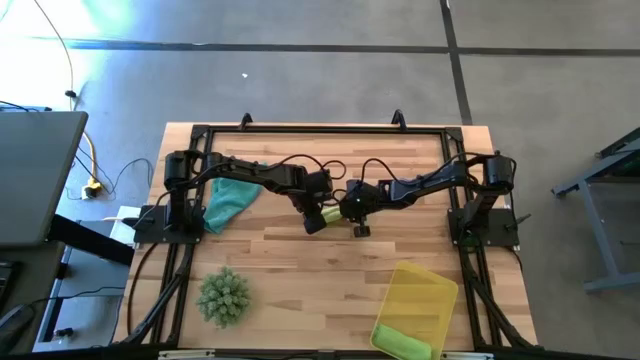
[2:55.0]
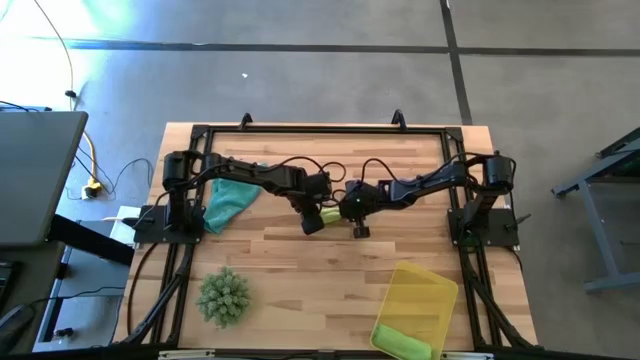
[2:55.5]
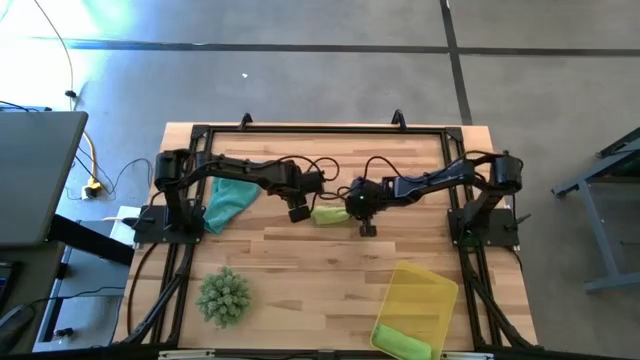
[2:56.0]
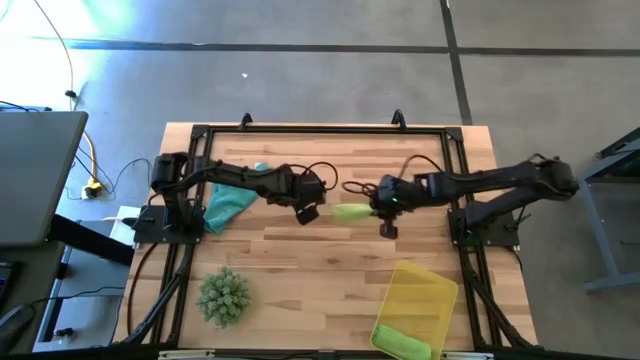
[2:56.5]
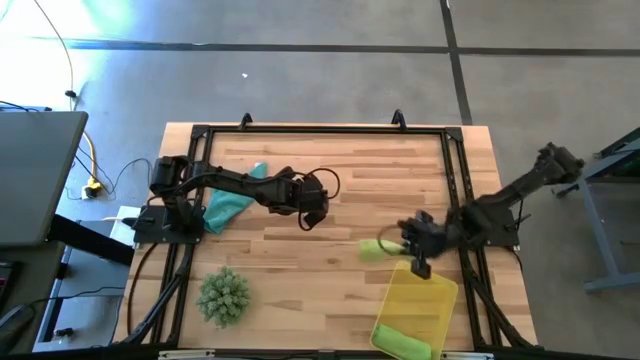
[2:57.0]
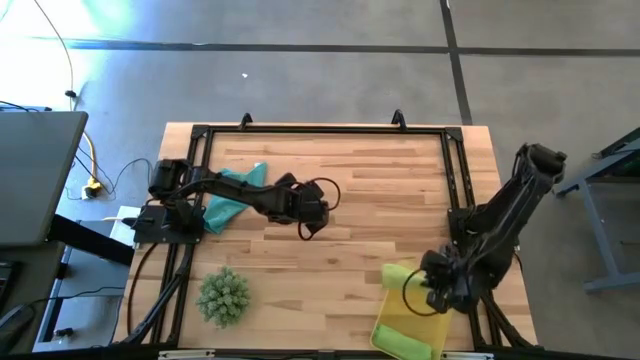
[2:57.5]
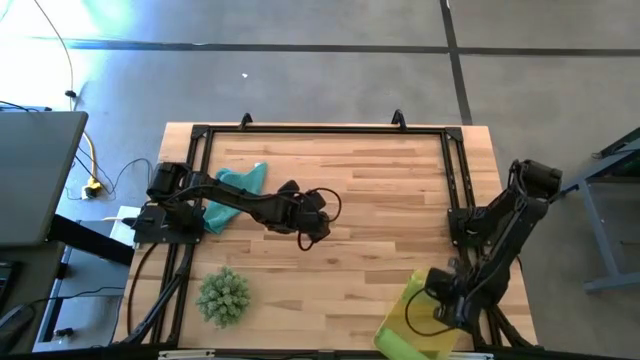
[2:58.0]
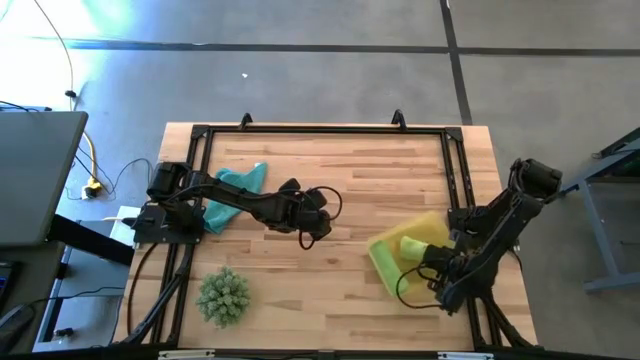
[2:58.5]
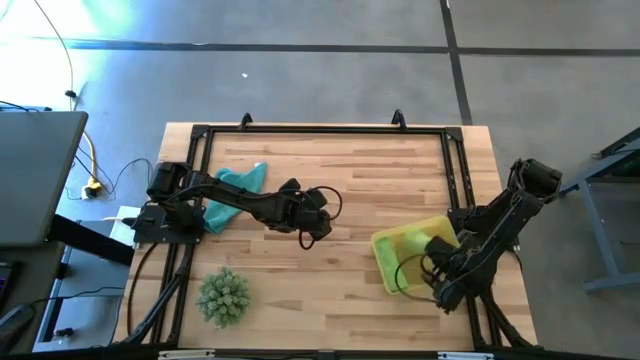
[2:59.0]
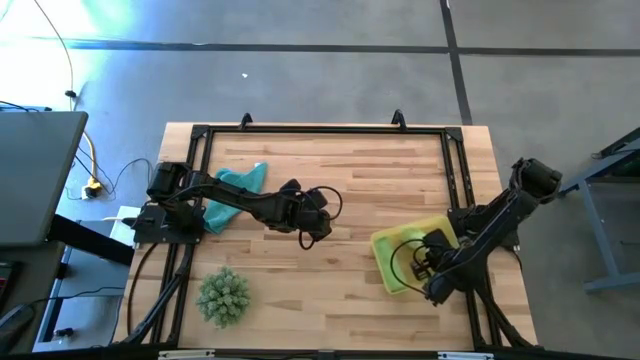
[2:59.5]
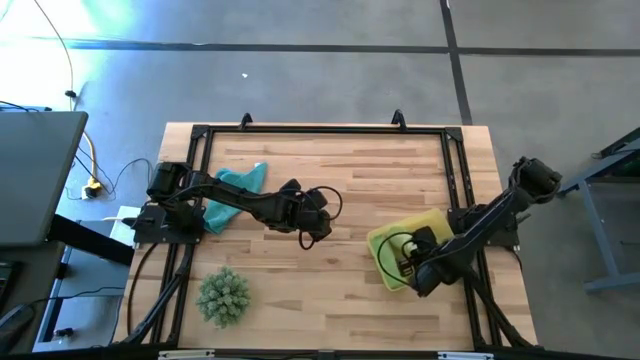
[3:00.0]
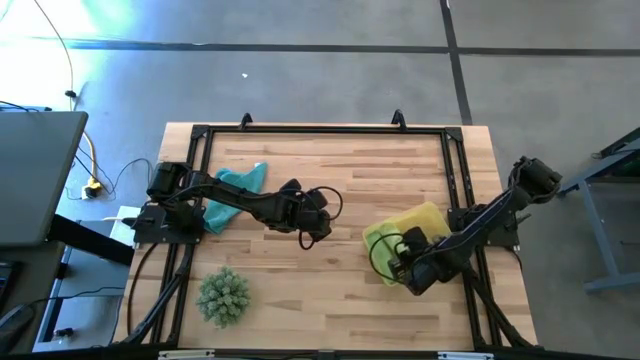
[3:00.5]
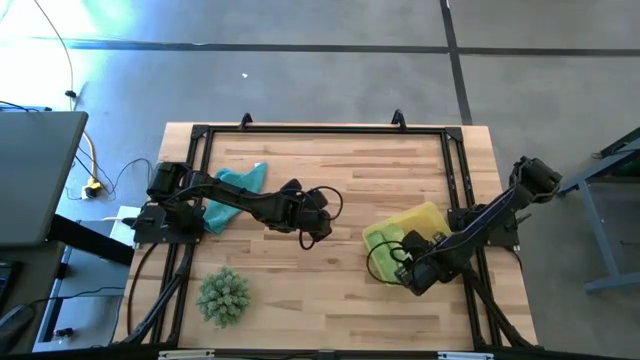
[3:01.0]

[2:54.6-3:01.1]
Task: Roll microfiber towels into tight, uniform cylinder then place into a basket
Put the light green microfiber cloth into the yellow bin

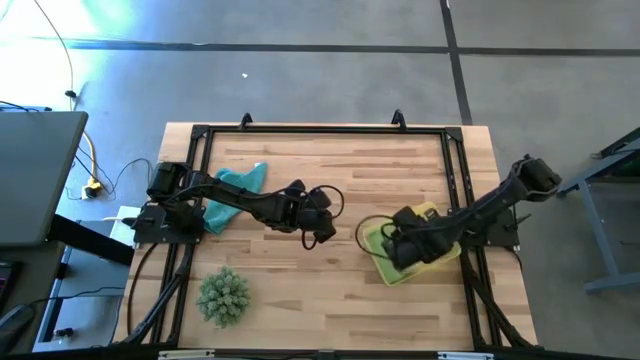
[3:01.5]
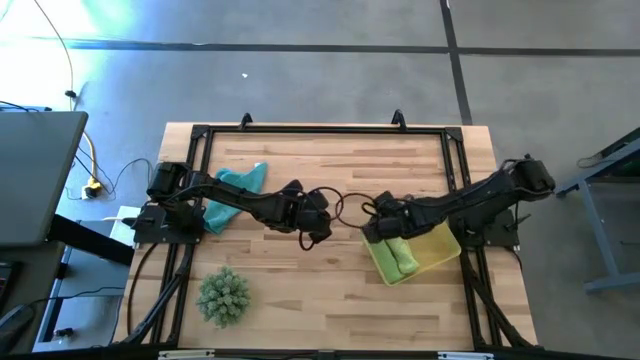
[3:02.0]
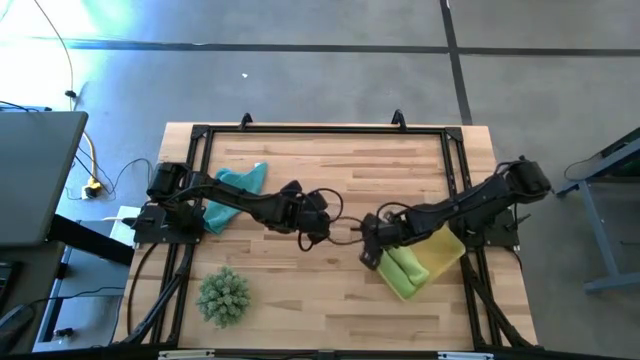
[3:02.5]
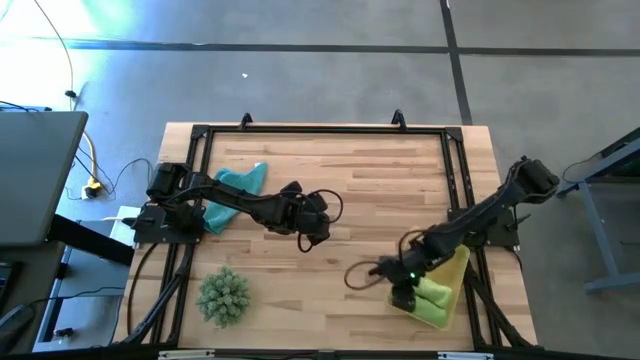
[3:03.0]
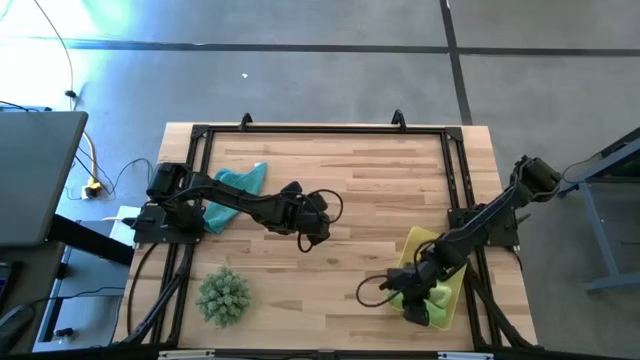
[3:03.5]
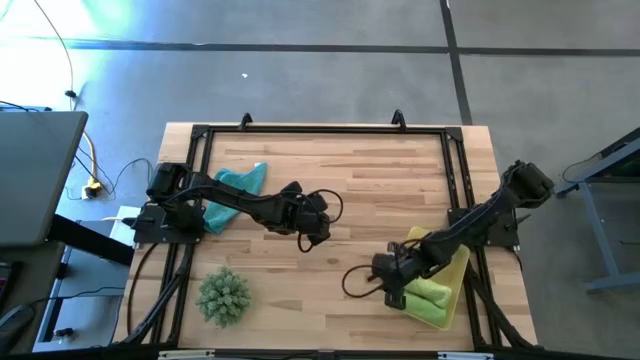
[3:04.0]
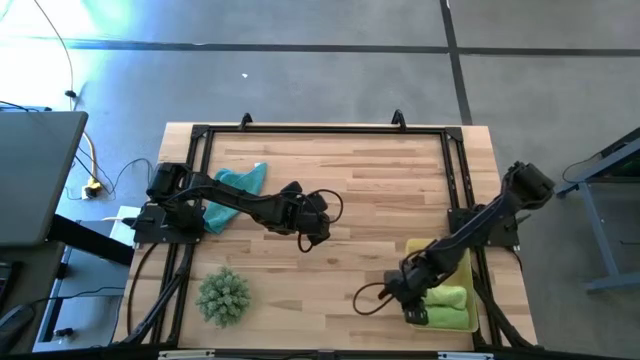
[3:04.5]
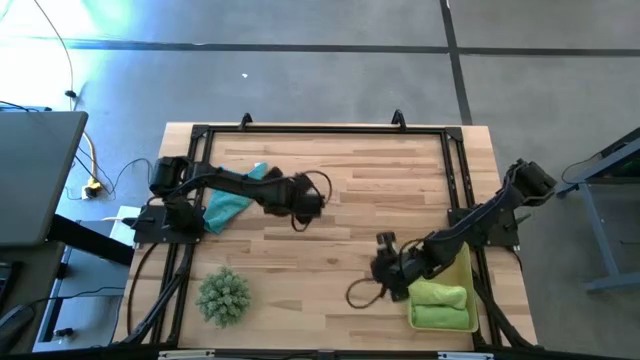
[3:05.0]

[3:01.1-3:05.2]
Adjust the yellow bin to the bottom right of the table

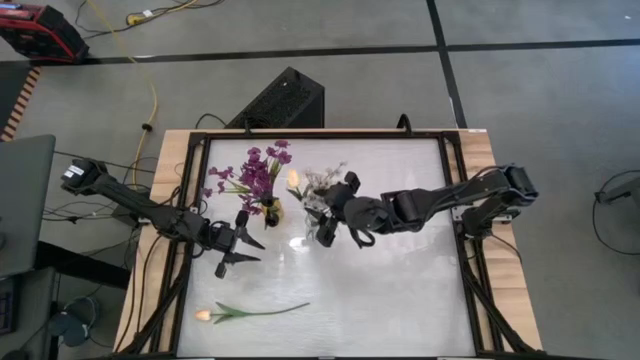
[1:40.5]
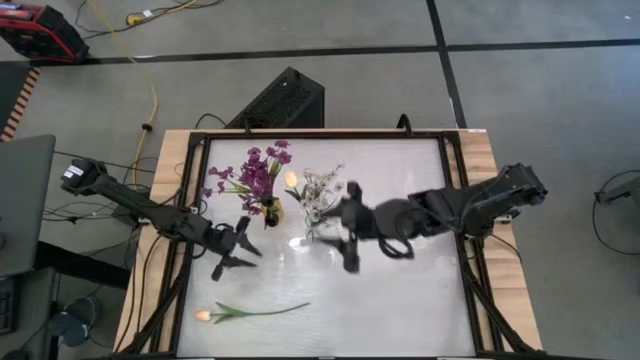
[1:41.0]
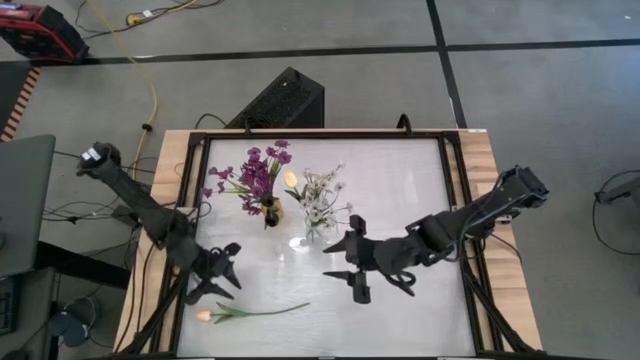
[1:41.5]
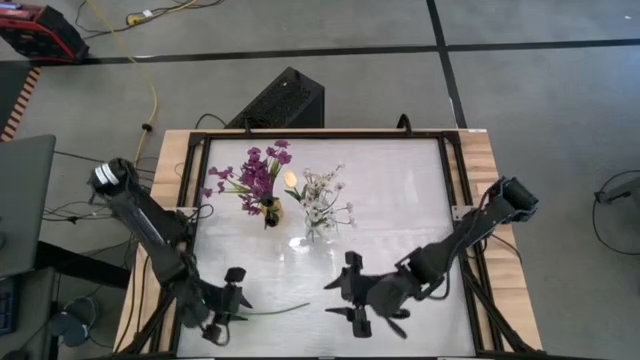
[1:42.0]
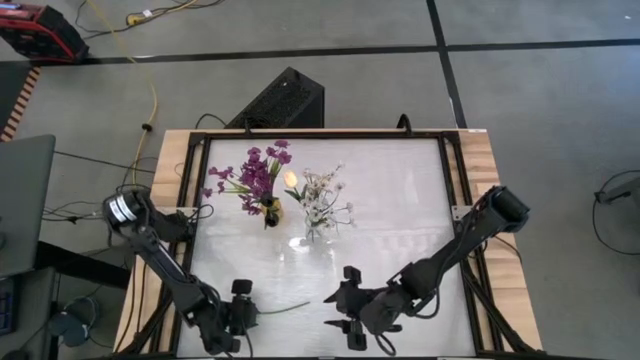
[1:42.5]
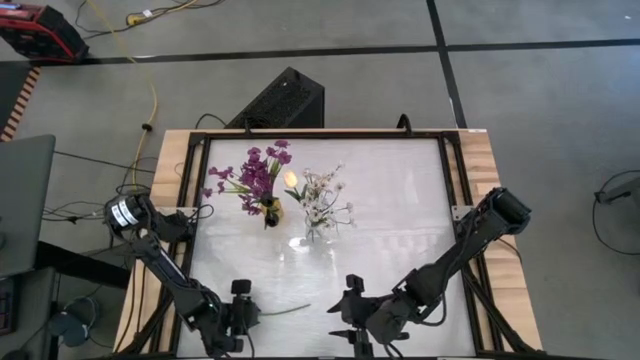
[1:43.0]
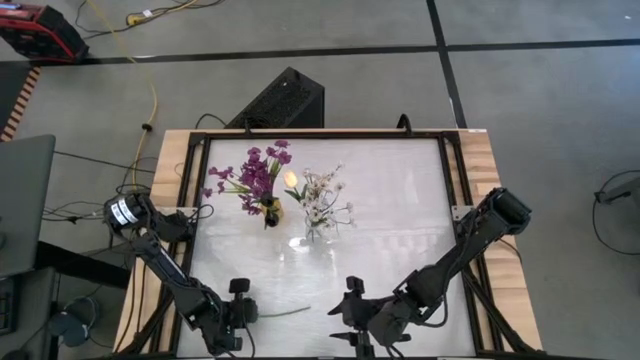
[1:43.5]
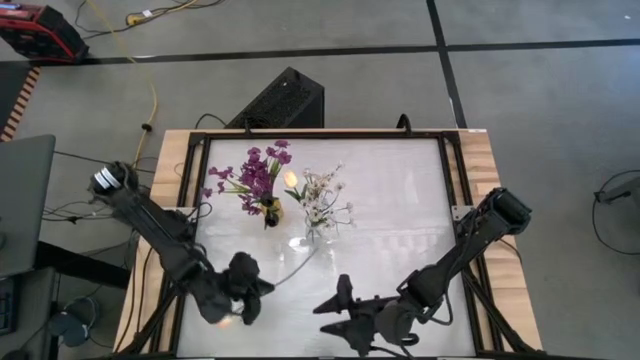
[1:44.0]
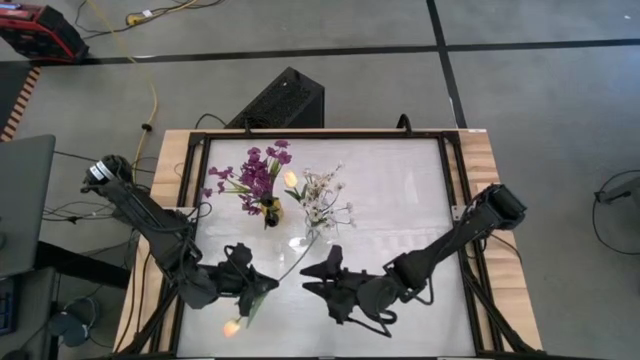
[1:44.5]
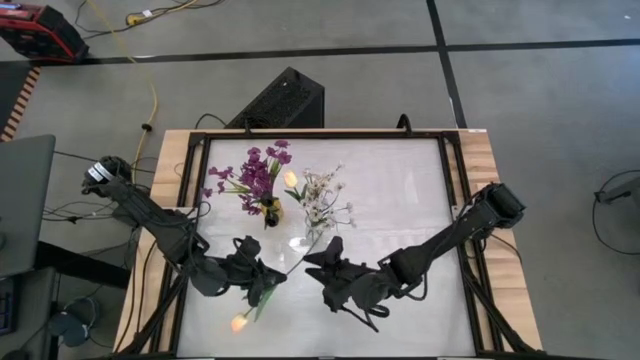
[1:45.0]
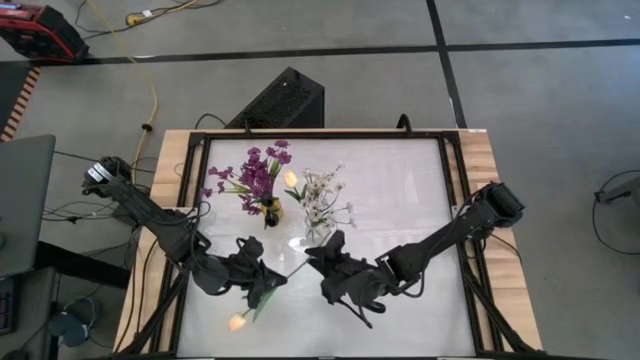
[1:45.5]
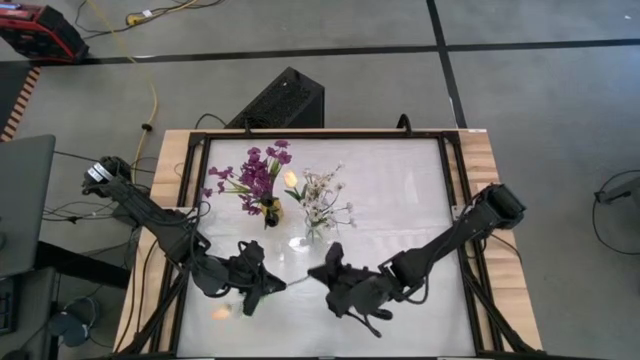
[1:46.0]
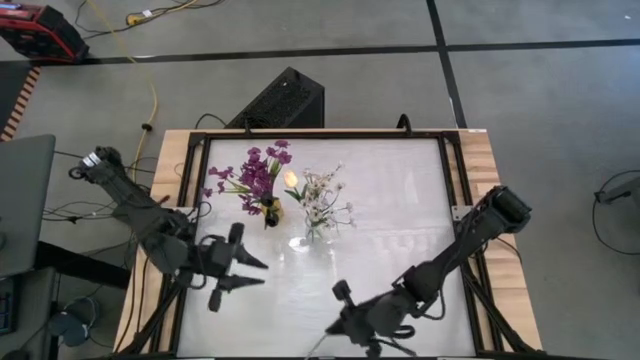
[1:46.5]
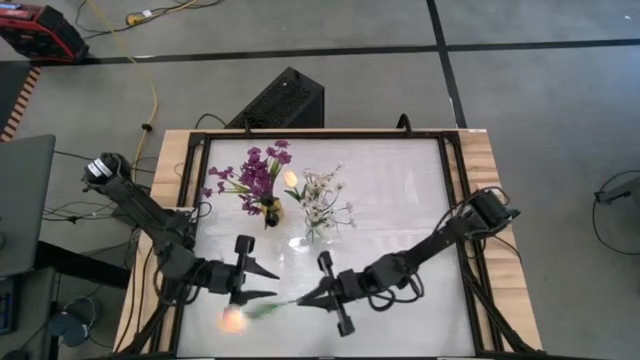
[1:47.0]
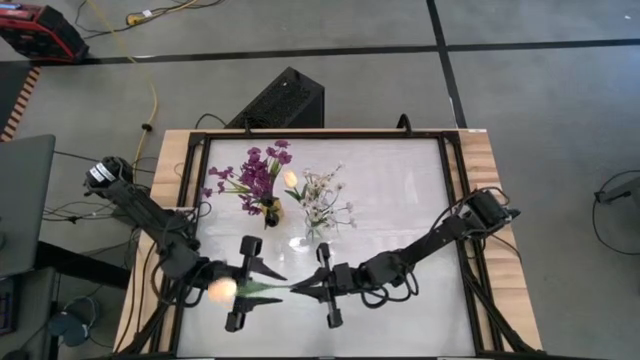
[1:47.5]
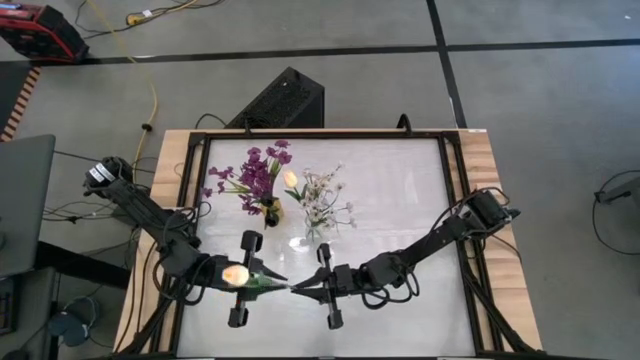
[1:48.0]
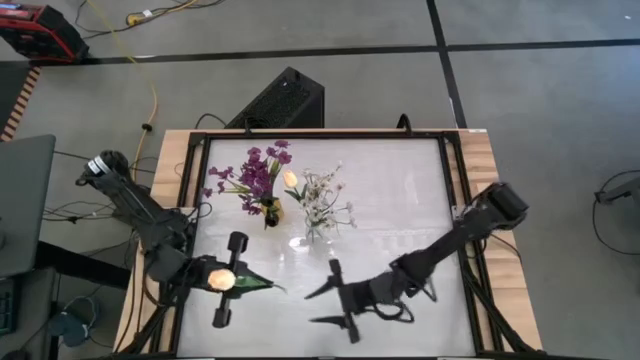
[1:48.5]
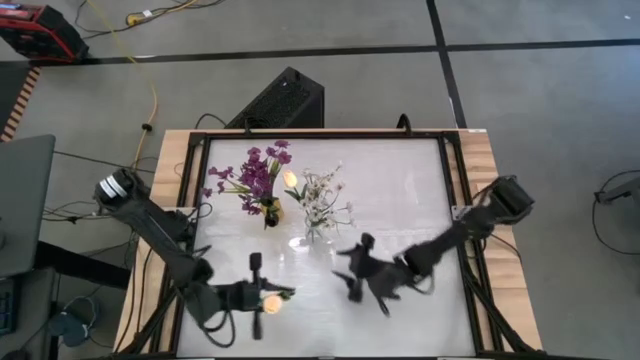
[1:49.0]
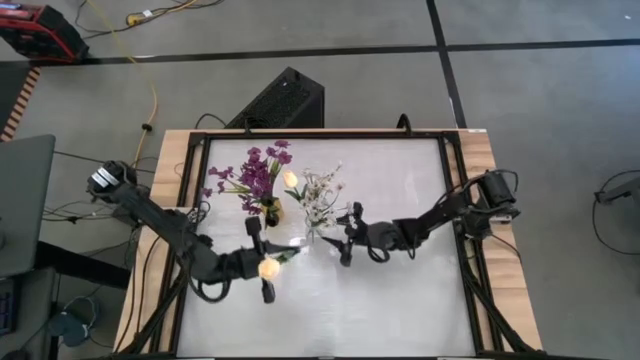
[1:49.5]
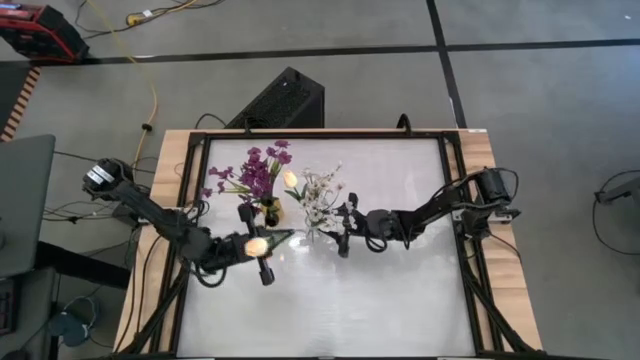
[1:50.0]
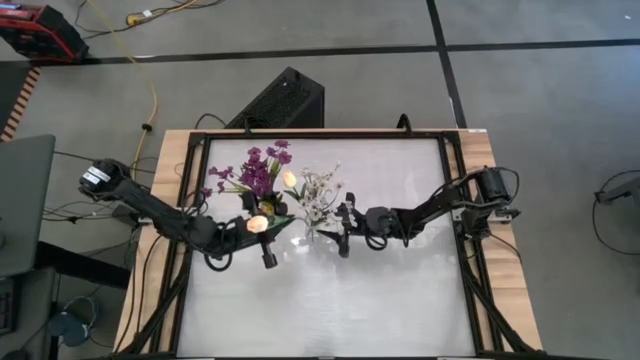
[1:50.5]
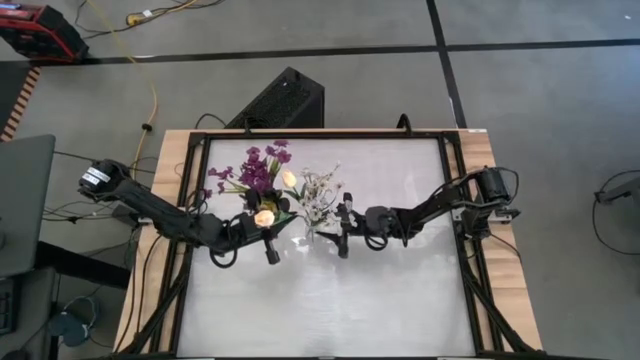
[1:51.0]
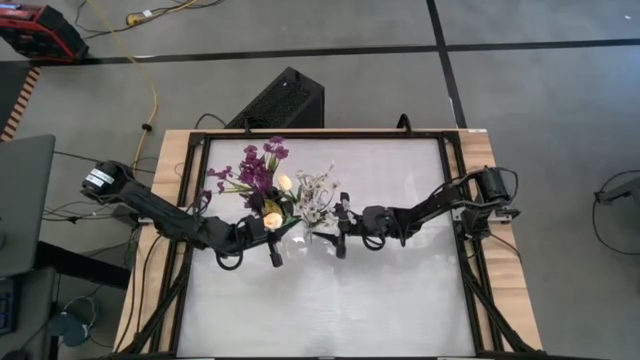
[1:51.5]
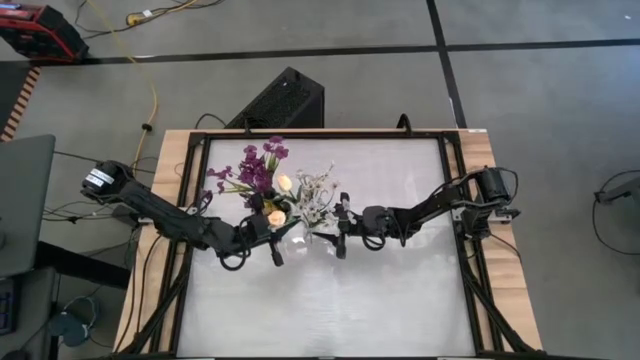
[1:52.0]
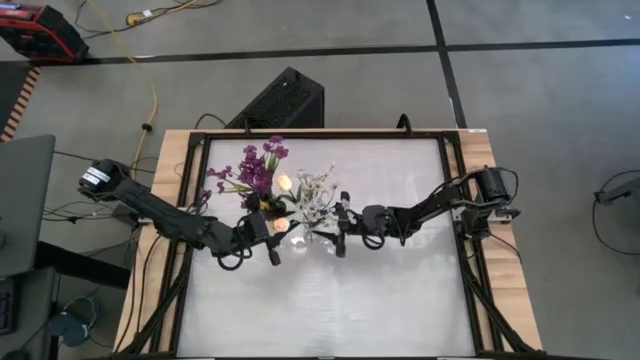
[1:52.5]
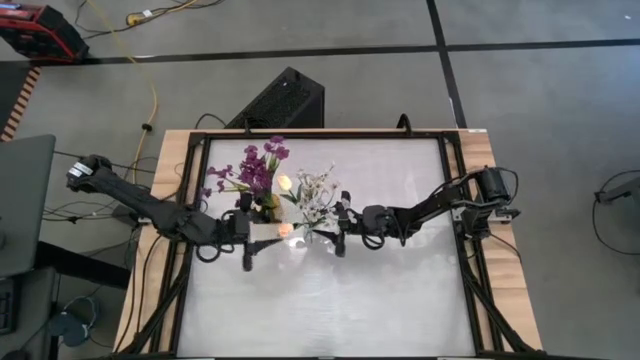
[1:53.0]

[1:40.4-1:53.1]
Task: Sort flowers into vase by color
Put the white tulip into the transparent vase
